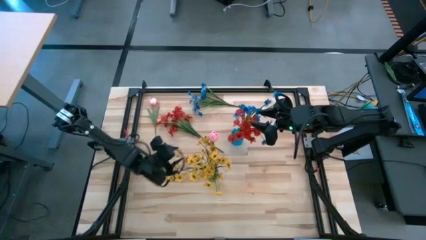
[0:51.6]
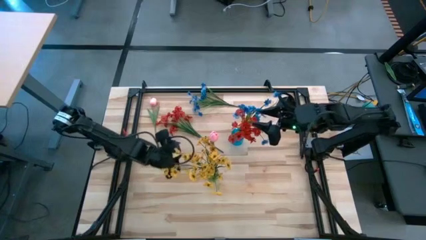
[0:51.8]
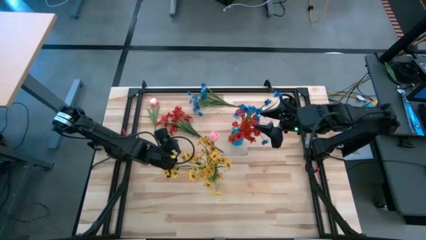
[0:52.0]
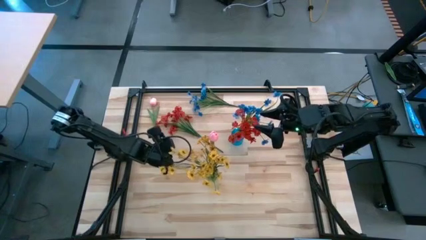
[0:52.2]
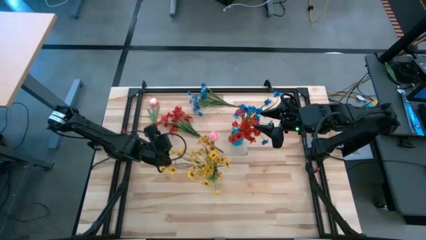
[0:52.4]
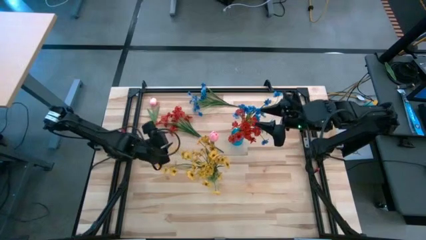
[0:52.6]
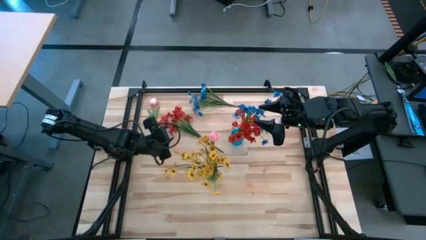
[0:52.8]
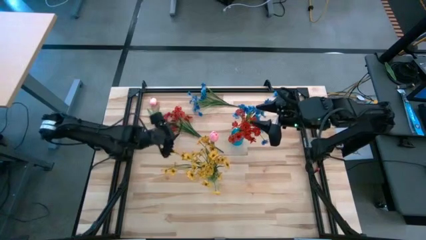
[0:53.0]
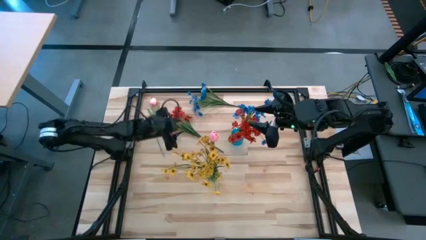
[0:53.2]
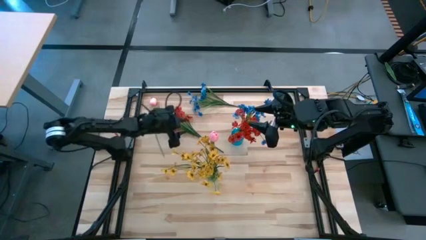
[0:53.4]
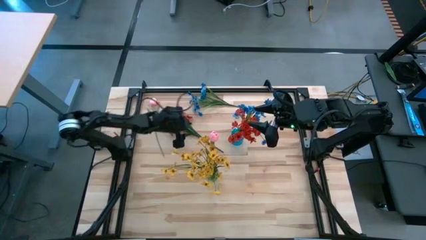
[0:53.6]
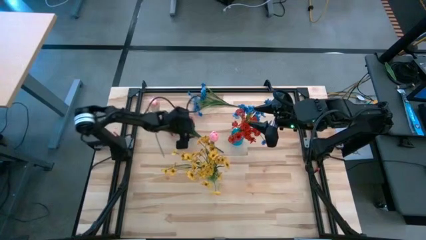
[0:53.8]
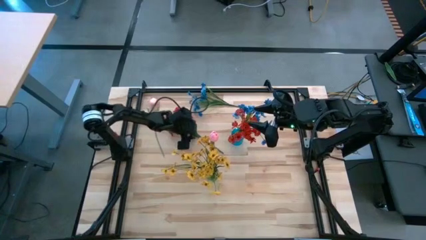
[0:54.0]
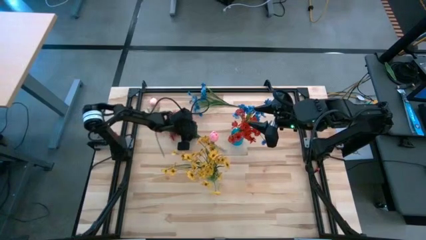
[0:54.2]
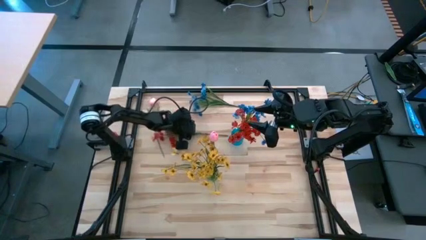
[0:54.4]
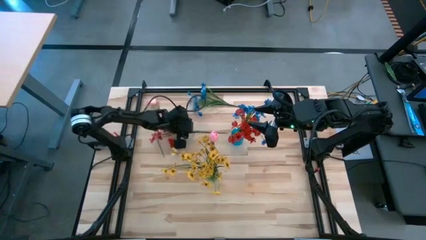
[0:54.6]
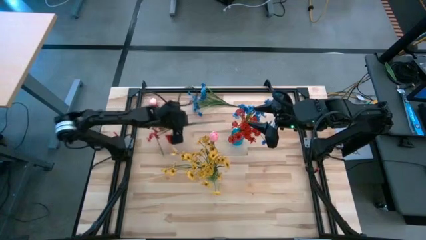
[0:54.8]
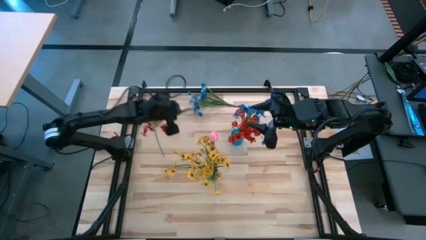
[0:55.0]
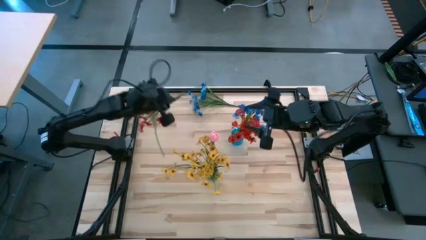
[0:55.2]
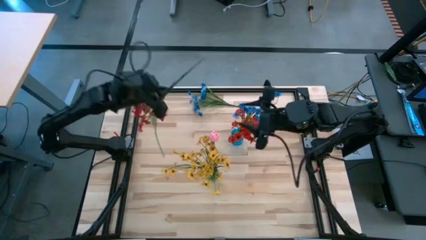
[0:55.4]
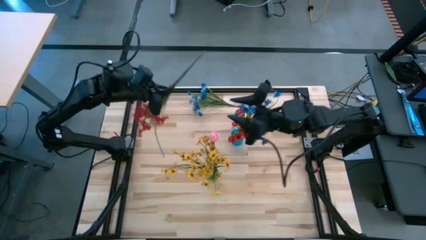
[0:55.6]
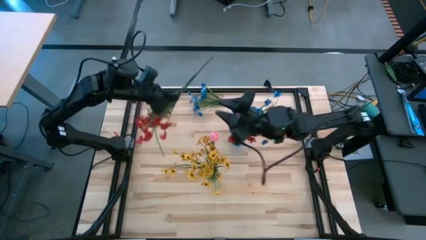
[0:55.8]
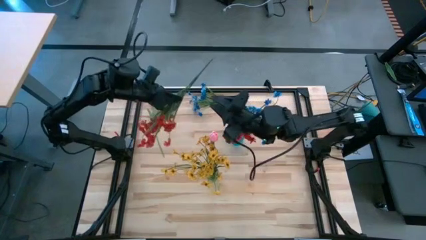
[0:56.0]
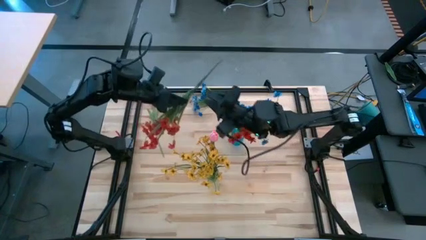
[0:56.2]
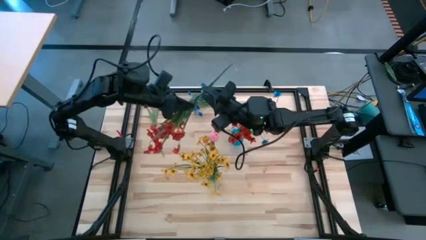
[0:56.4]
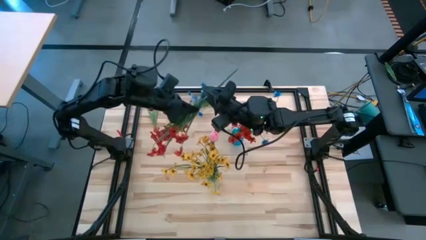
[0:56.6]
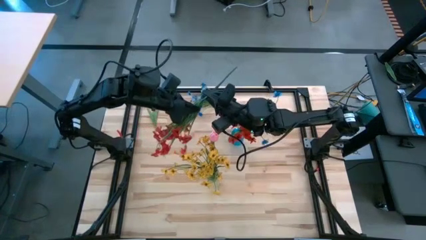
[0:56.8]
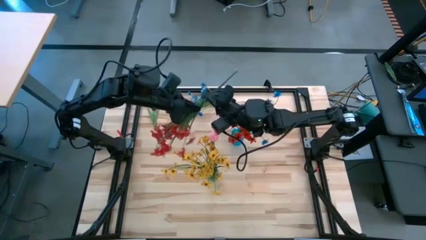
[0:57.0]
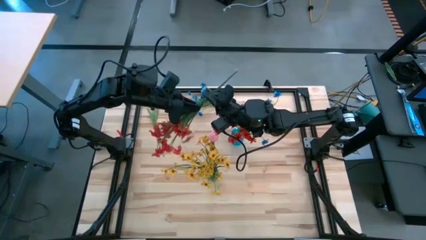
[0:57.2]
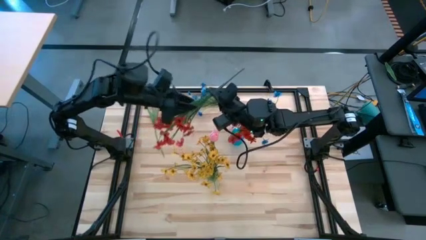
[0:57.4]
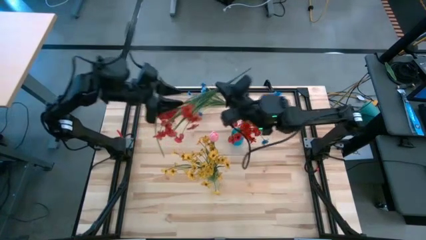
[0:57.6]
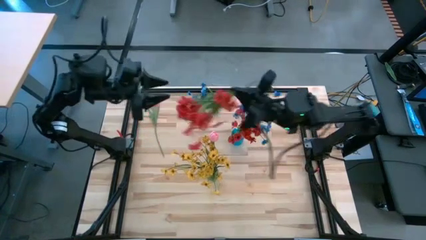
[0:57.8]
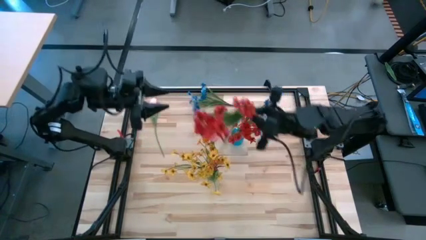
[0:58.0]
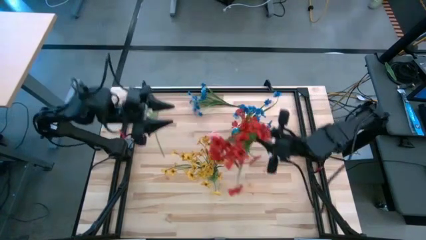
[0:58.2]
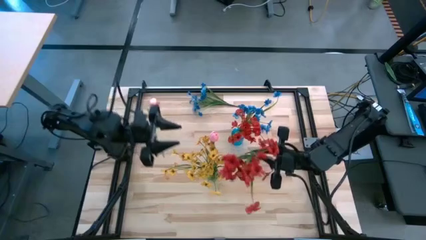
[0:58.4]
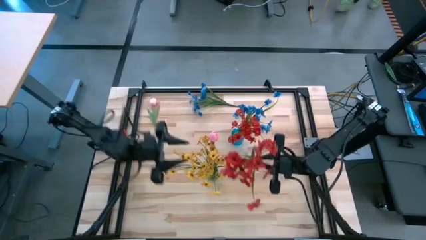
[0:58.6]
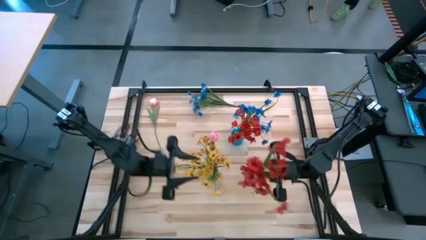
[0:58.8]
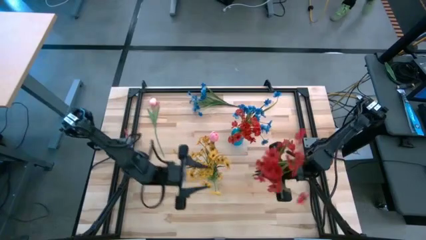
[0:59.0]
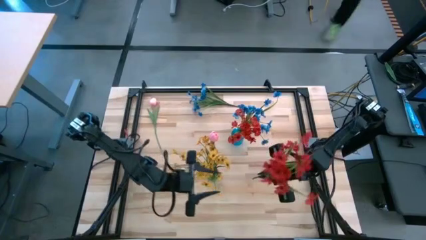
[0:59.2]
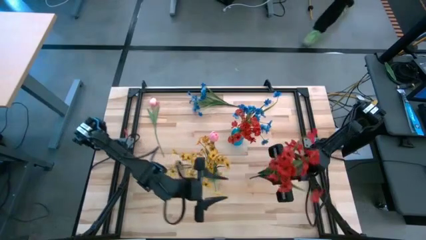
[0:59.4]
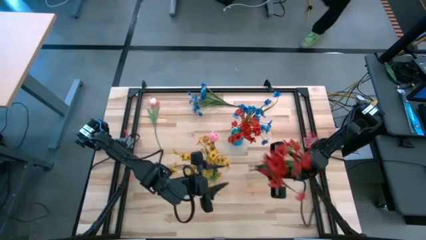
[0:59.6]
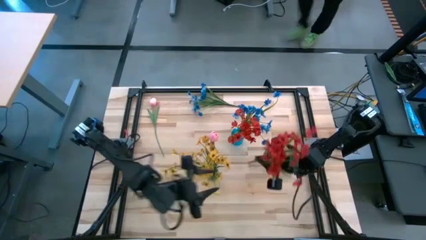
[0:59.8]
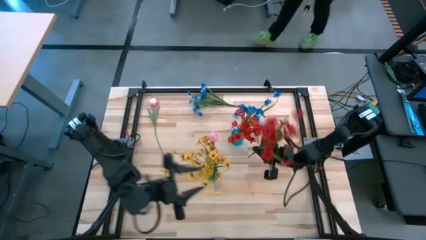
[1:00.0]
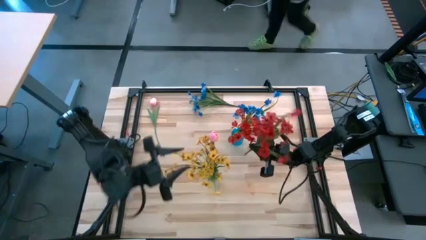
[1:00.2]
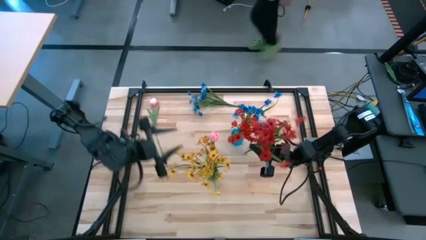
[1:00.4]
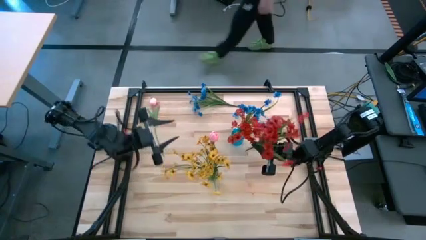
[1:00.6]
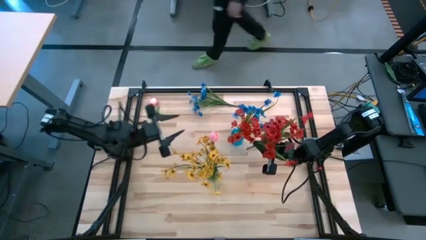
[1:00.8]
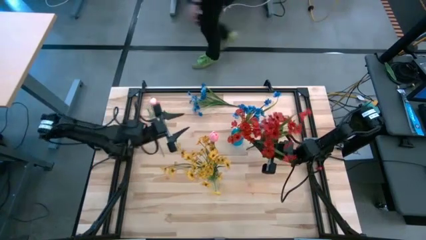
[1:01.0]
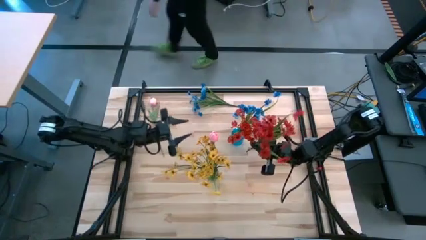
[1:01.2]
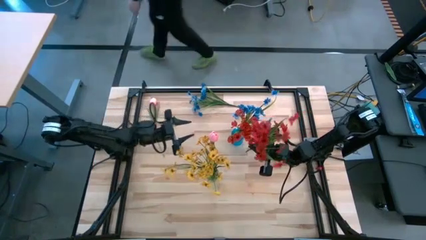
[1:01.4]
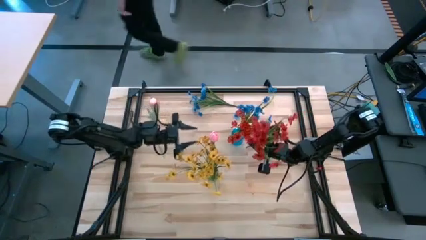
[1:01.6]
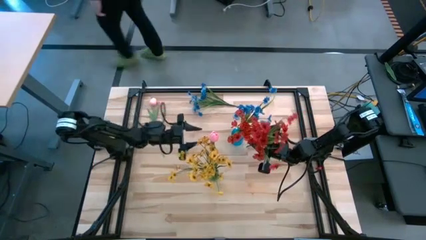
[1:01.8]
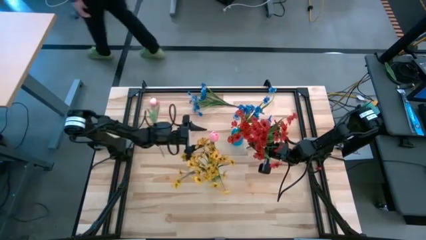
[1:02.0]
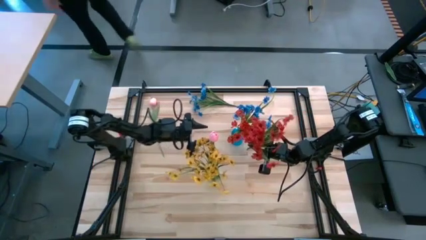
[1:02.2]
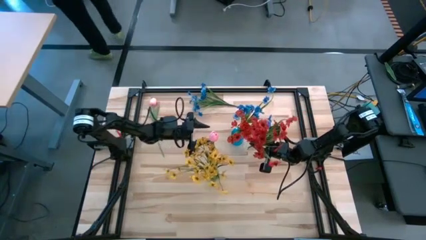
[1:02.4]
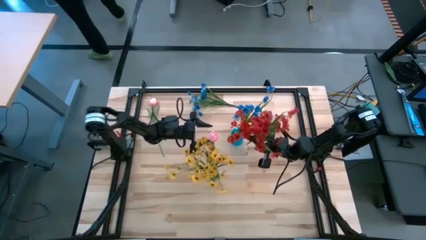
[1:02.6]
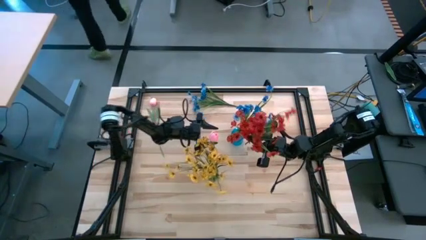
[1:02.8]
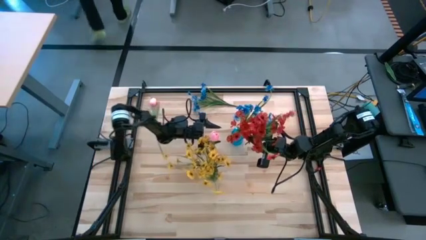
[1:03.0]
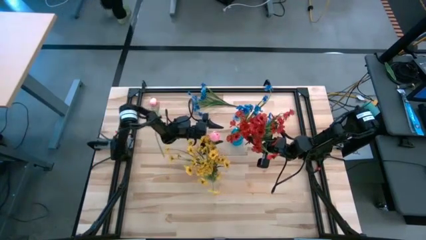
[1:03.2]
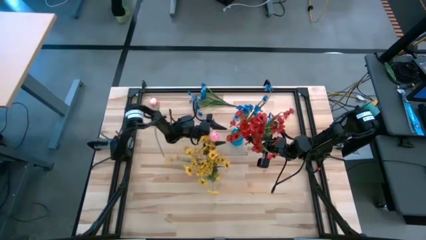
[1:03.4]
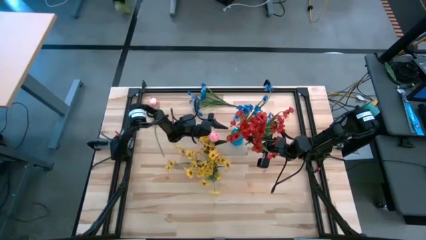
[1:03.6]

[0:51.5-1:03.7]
Task: Sort flowers into vase by color
Put the red flowers into the blue flower vase

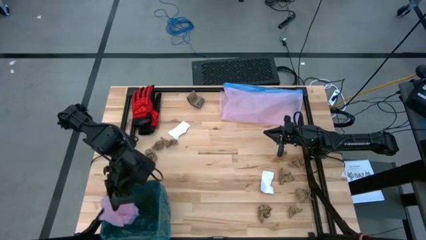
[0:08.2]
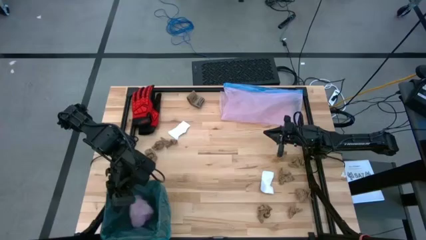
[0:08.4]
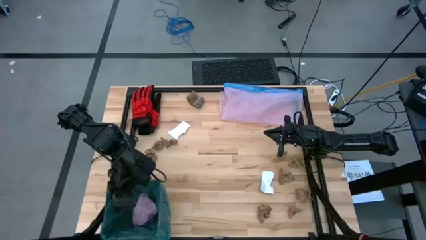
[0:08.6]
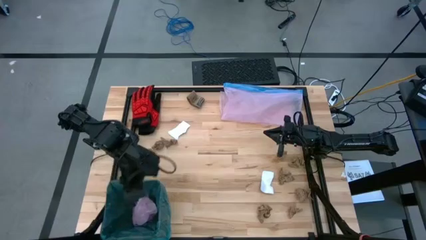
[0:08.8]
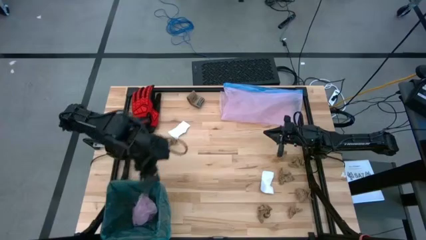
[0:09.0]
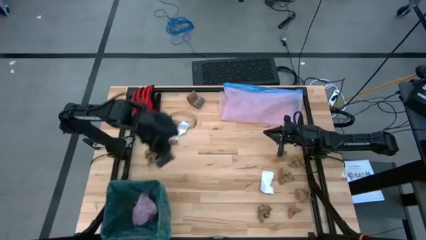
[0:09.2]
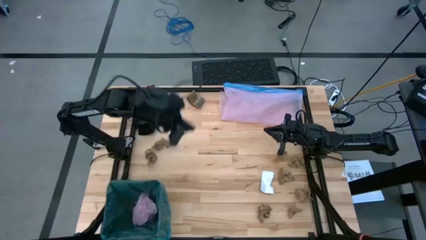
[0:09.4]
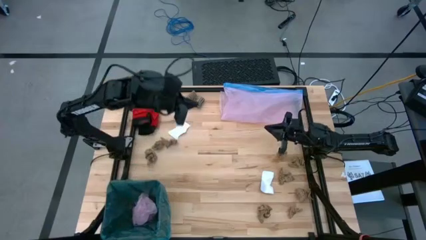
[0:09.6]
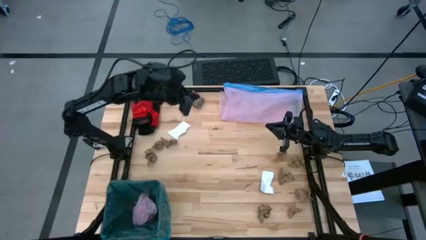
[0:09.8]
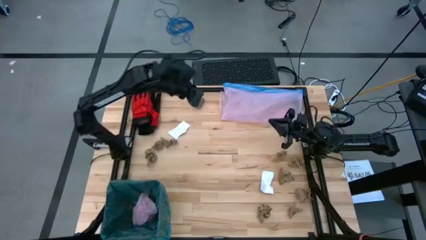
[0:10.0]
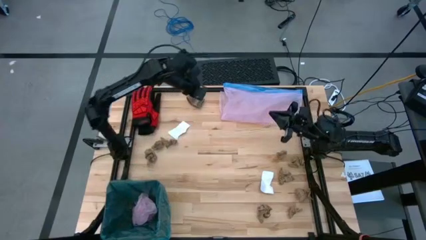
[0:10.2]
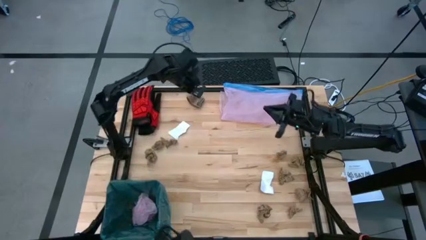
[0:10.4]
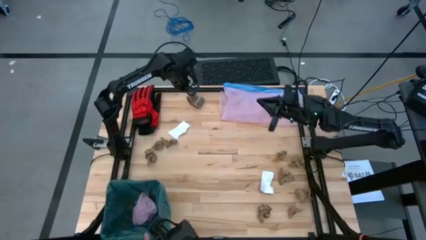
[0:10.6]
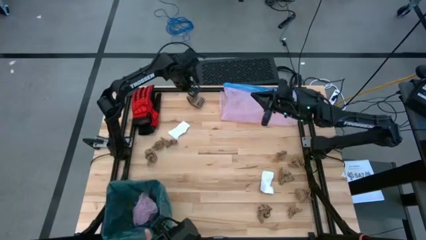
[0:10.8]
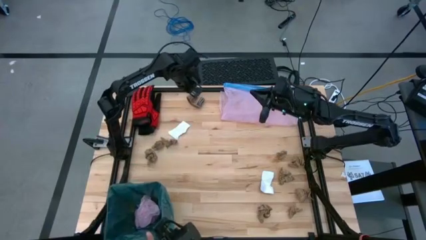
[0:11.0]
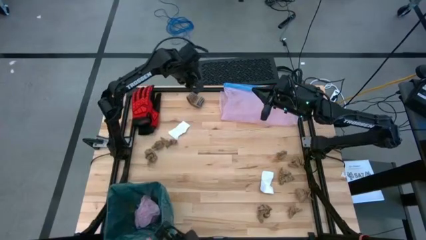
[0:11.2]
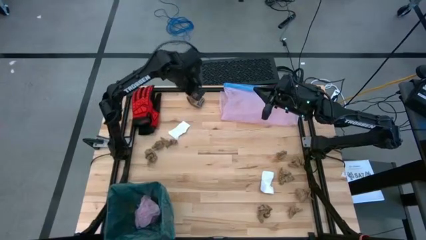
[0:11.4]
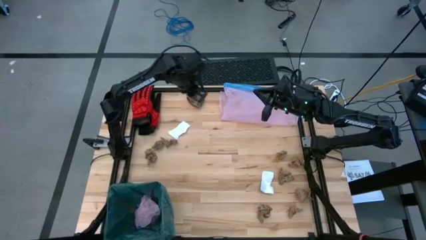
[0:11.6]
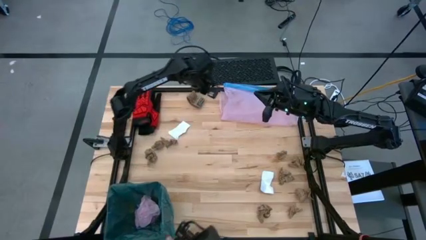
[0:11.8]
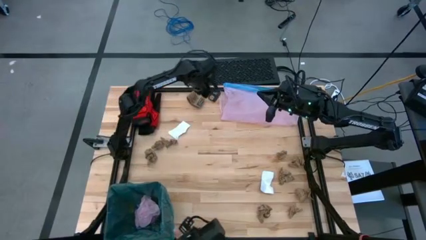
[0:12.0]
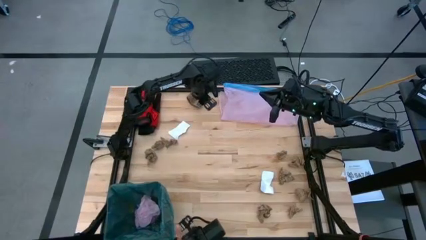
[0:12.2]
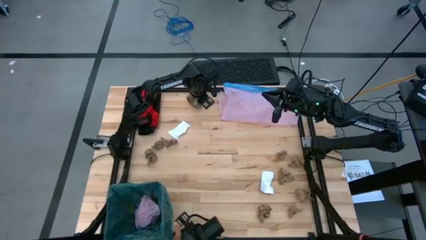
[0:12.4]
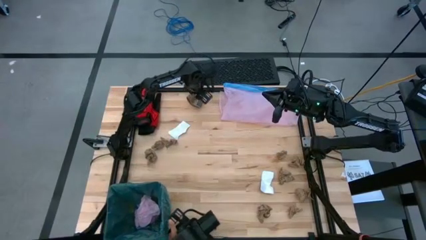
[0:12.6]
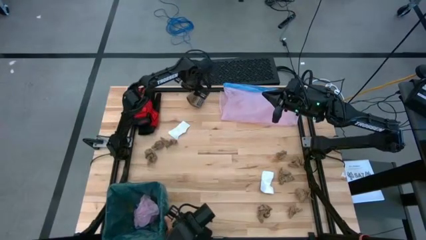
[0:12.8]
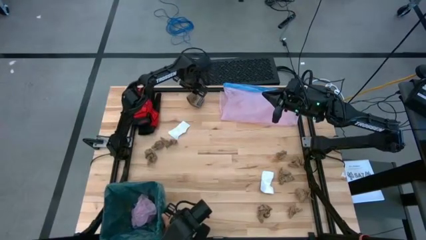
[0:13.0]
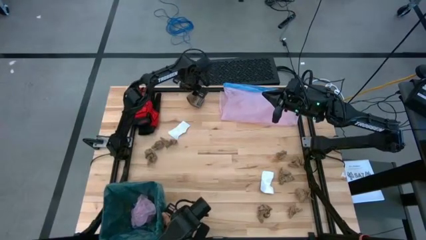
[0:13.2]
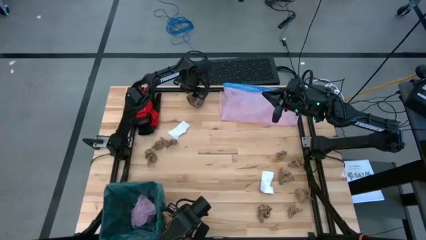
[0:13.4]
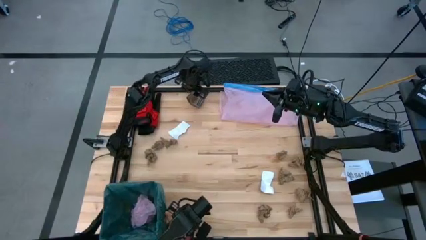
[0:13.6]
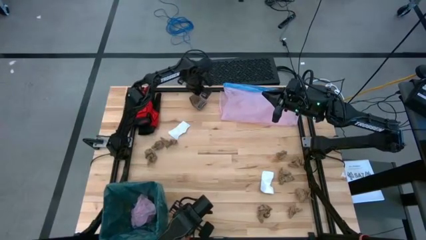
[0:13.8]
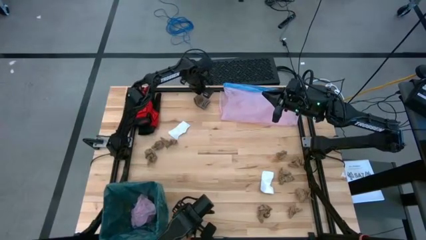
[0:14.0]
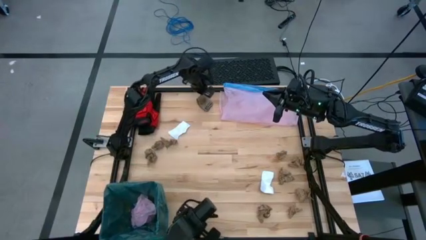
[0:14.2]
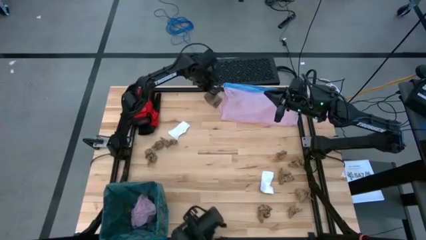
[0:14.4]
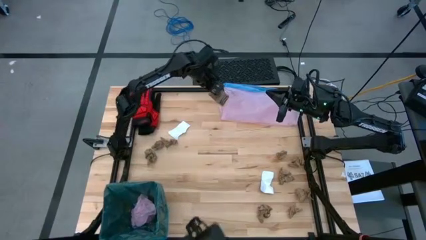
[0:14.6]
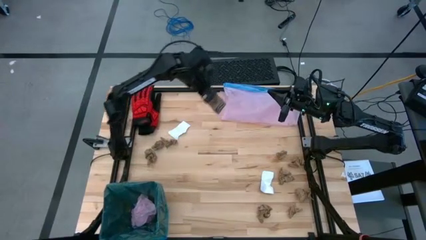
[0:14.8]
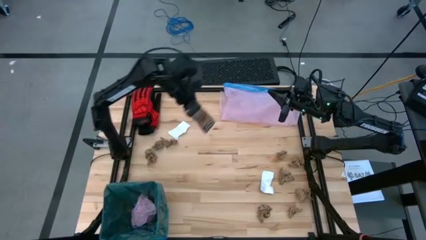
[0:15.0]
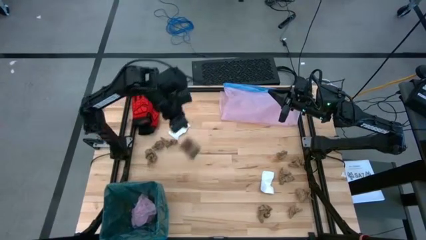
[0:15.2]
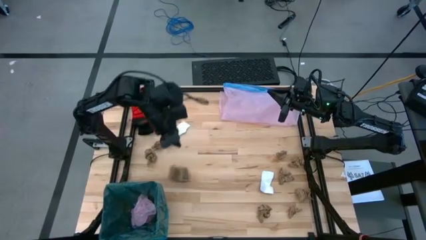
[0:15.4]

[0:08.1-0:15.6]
Task: place trash/remove bag and relplace
Put the cardboard coffee sleeve into the black trash bin
